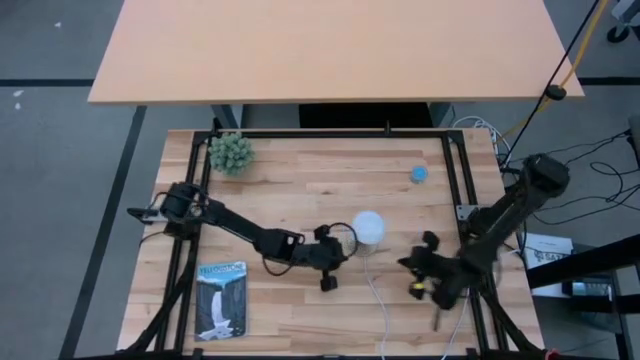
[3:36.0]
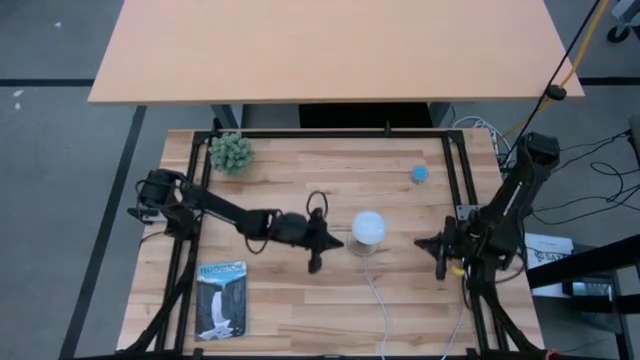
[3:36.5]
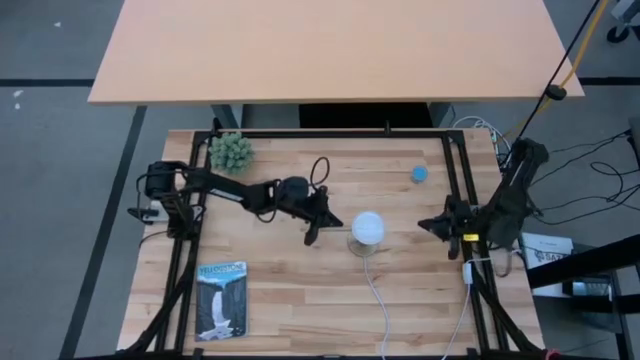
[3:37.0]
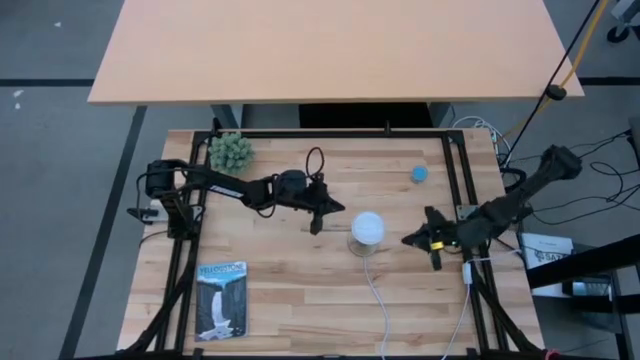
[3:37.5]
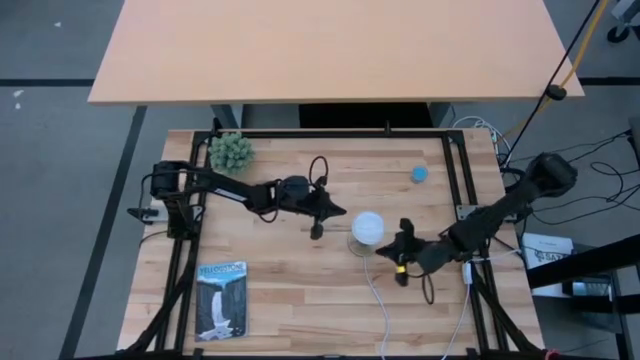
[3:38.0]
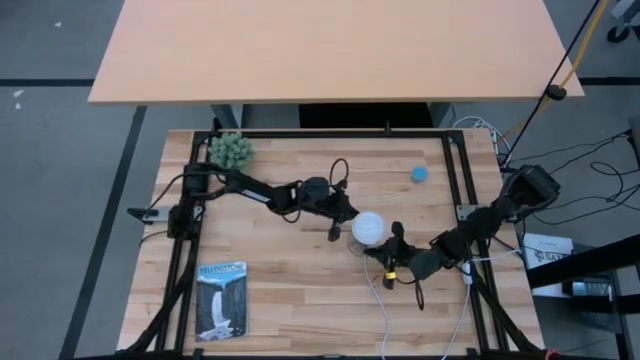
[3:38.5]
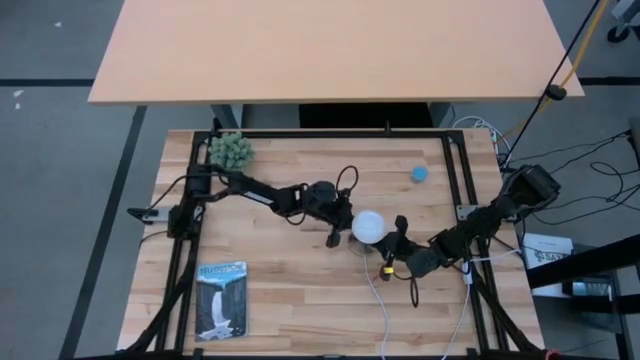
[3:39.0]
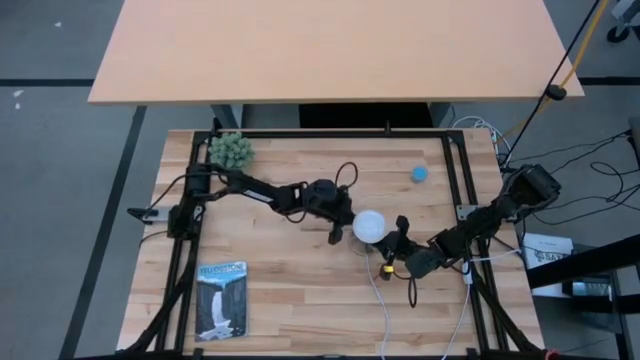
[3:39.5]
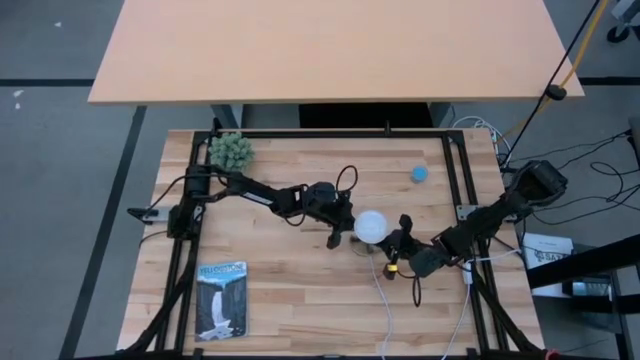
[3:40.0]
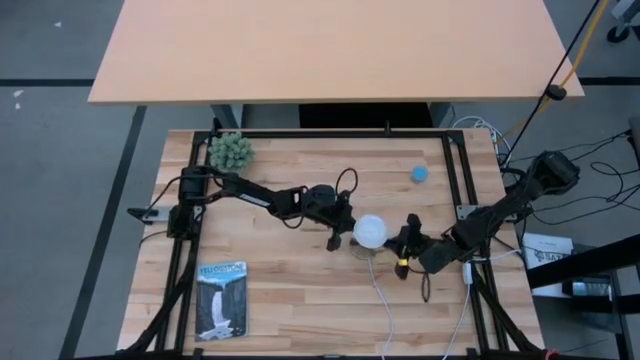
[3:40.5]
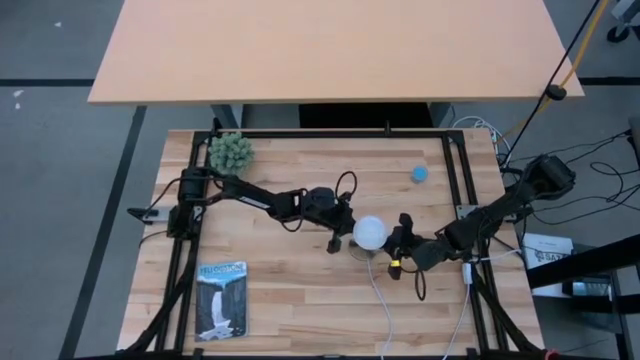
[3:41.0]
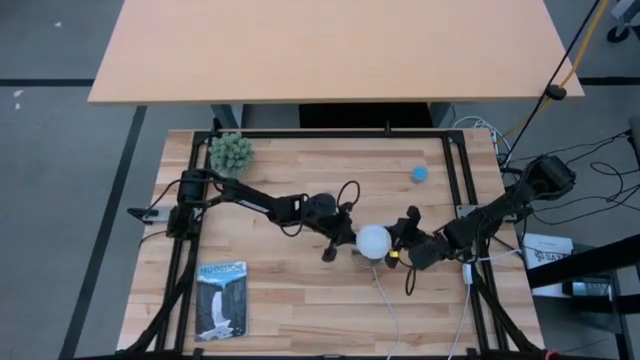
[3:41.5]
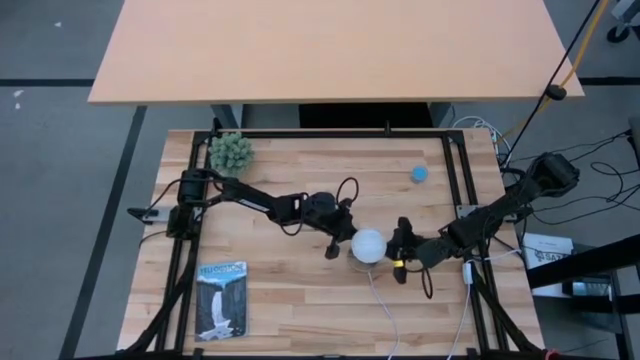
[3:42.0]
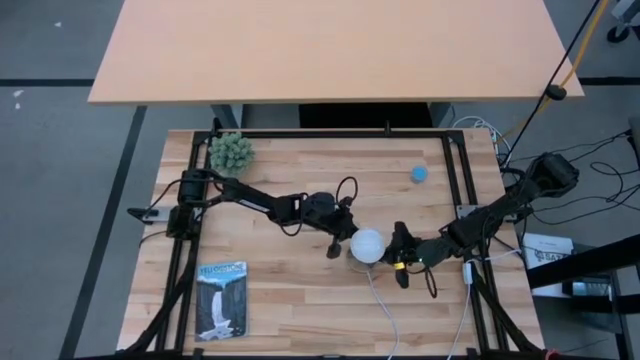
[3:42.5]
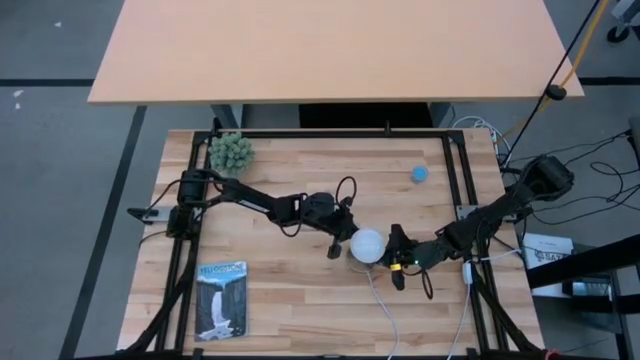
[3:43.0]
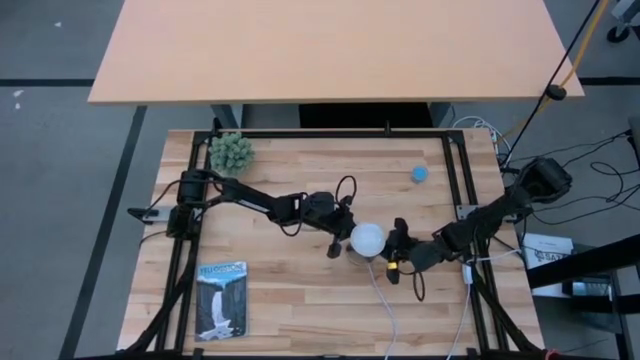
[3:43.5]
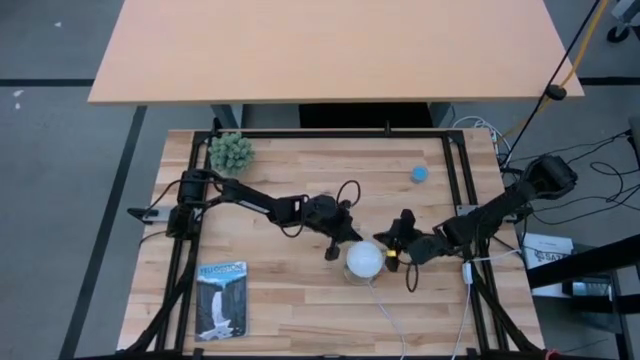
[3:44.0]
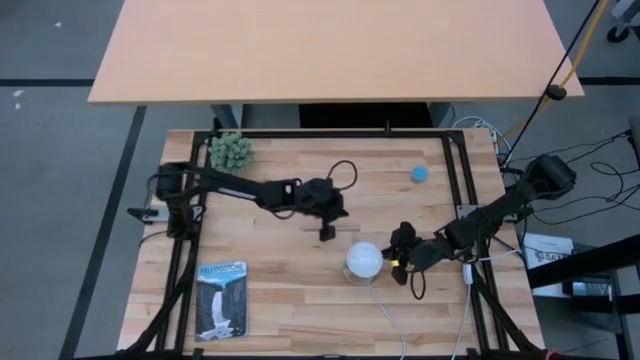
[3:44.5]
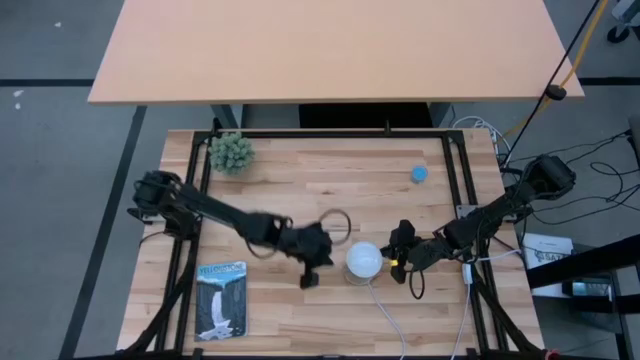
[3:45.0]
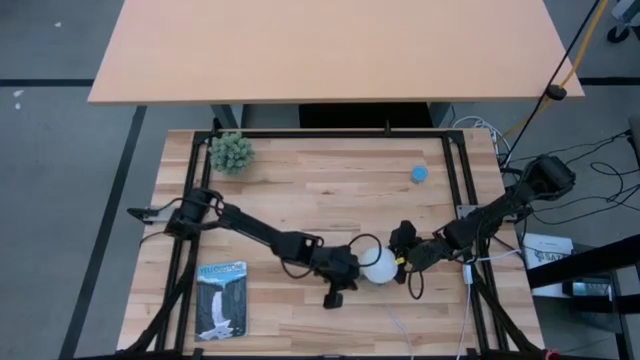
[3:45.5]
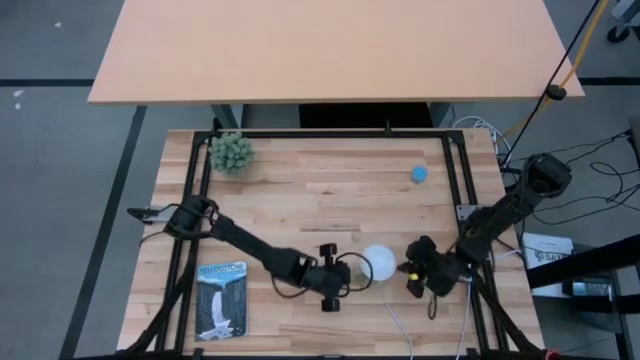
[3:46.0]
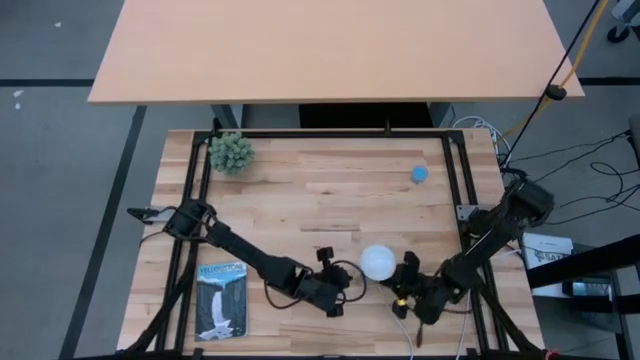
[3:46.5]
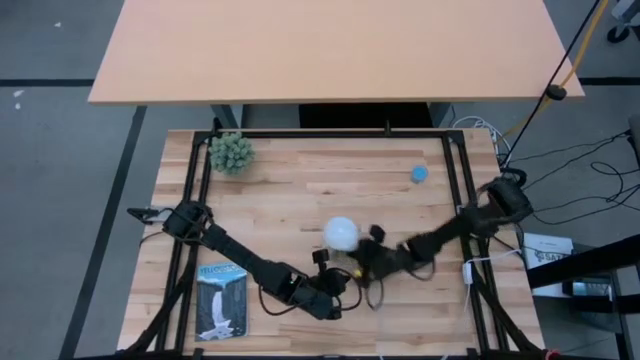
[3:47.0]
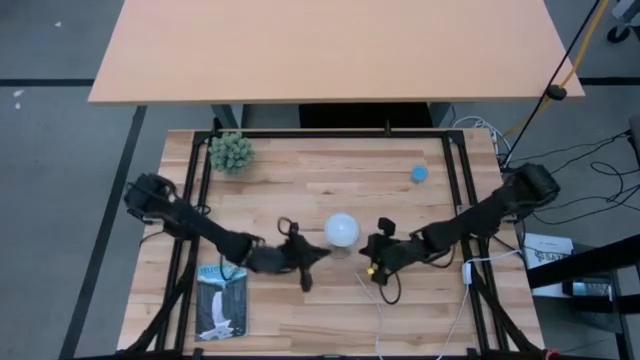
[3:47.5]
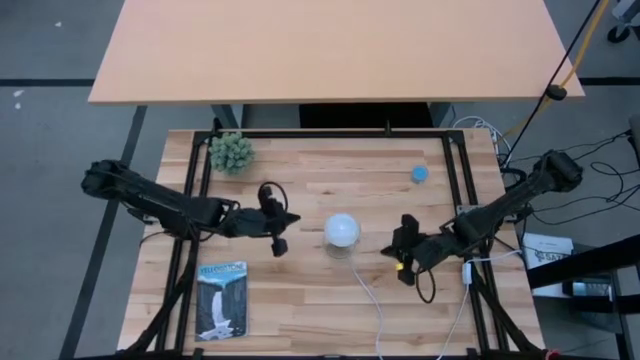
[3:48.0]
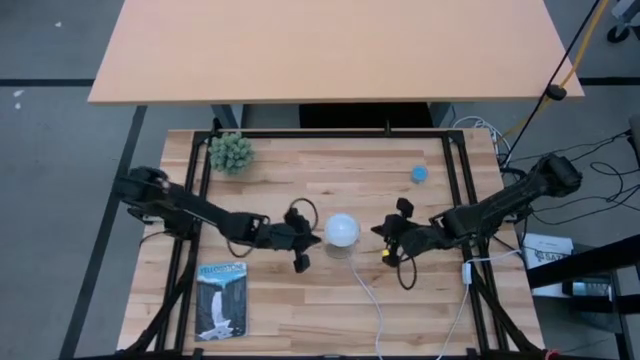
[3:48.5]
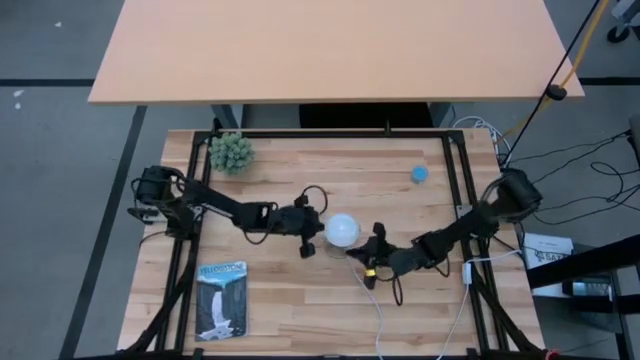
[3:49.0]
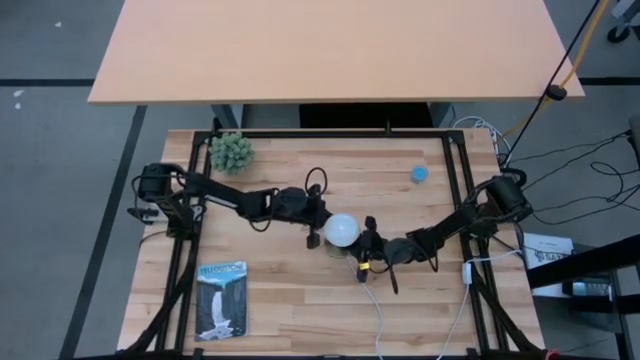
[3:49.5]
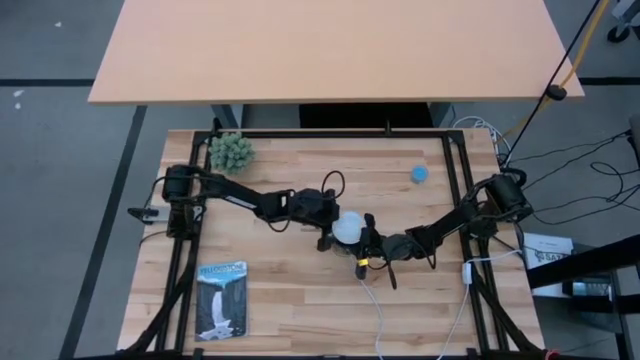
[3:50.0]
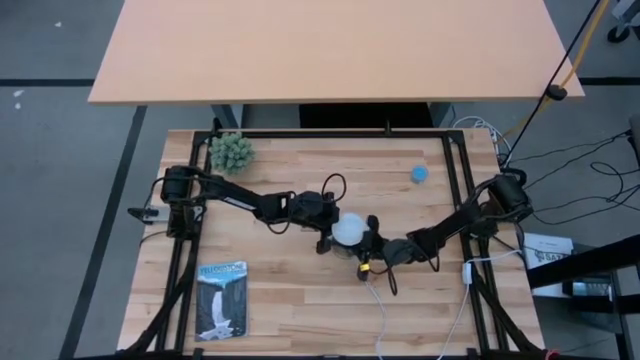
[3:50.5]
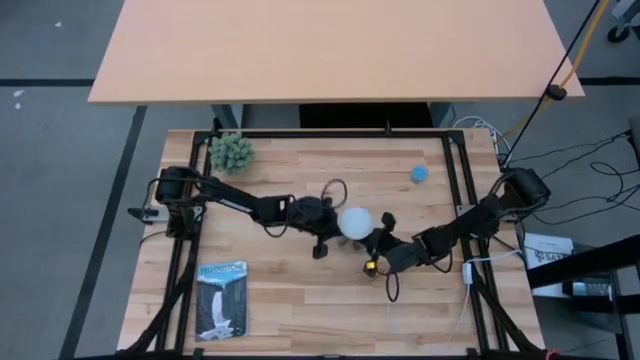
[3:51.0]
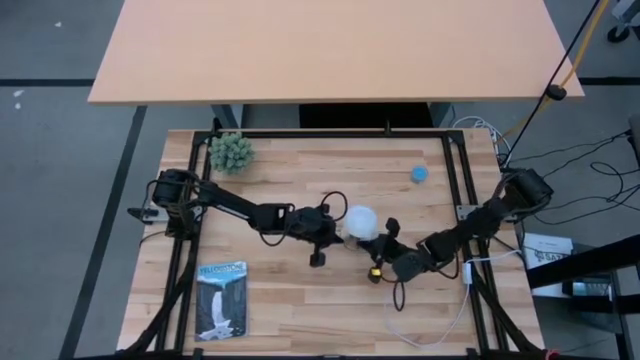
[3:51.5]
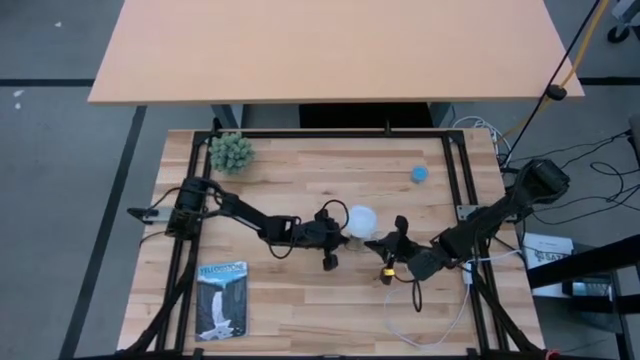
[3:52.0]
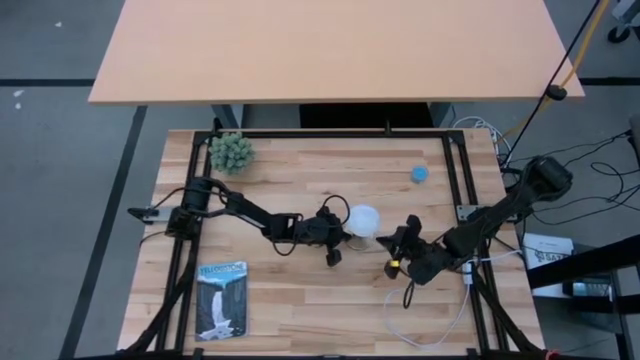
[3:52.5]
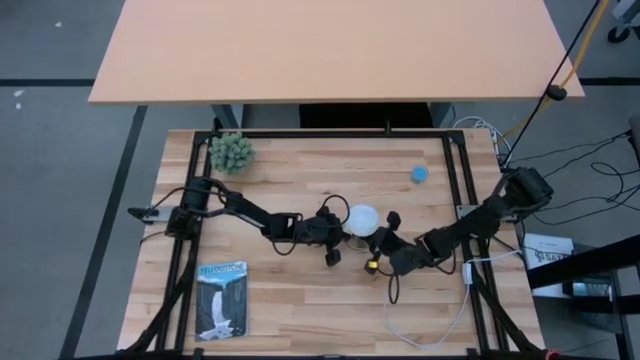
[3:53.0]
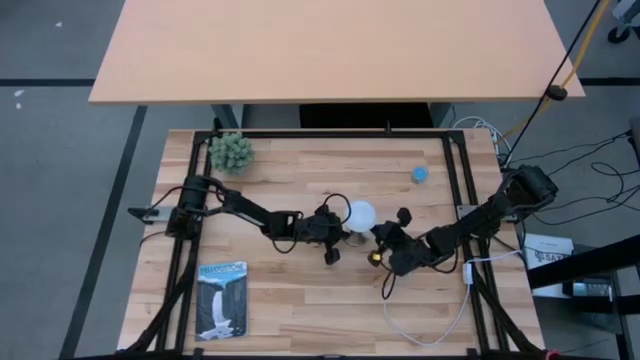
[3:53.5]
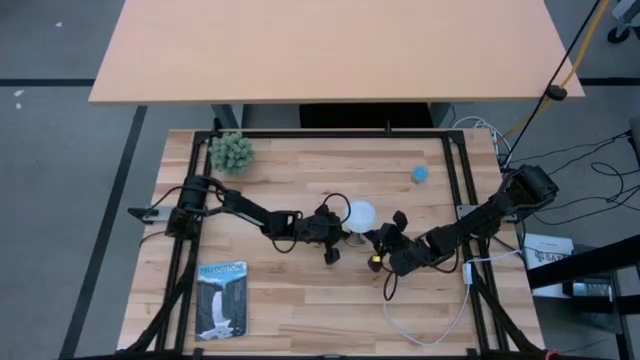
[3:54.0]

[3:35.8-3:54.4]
Task: Screw lightbulb
Remove the lightbulb from the desk lamp

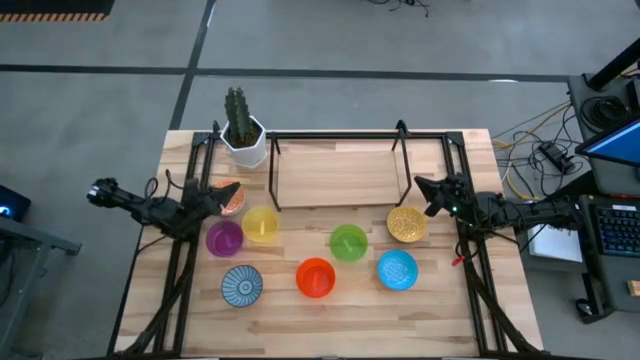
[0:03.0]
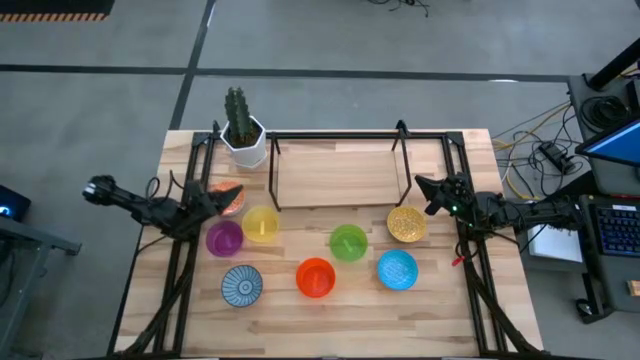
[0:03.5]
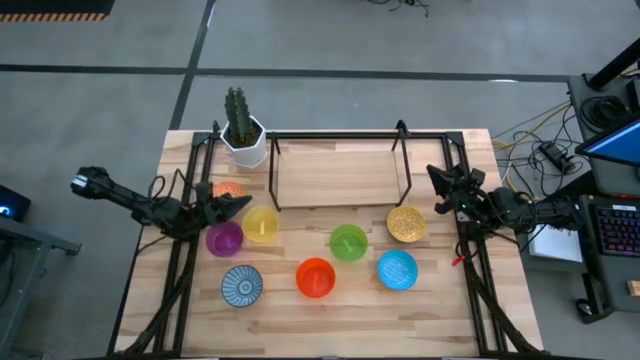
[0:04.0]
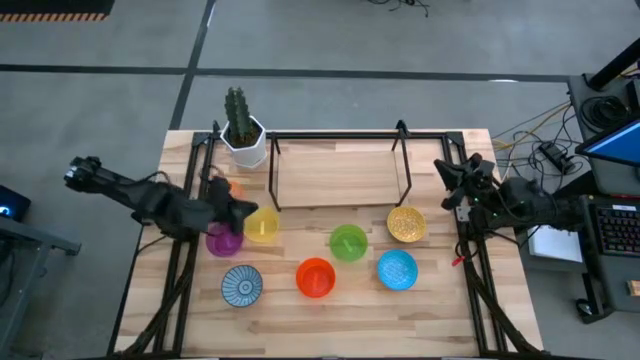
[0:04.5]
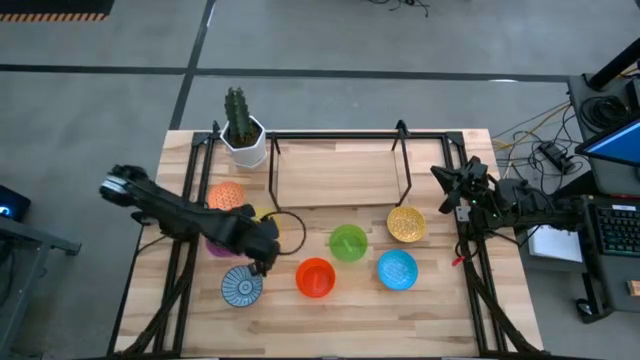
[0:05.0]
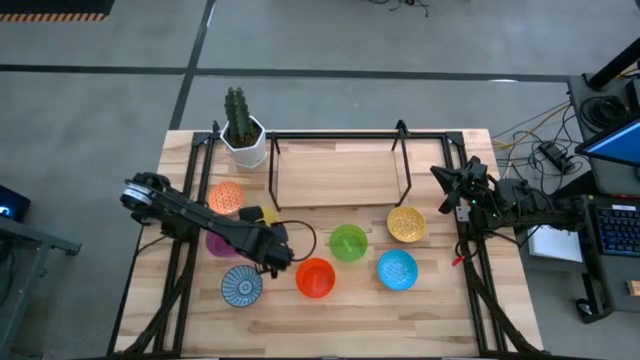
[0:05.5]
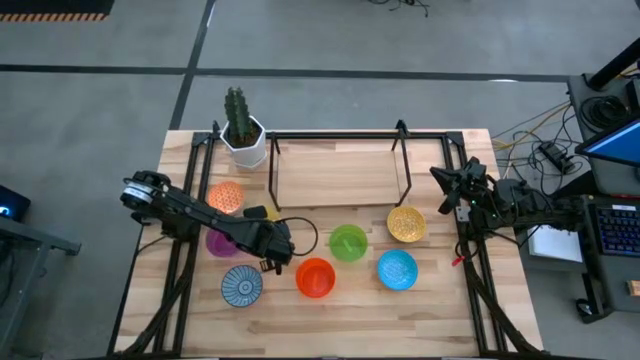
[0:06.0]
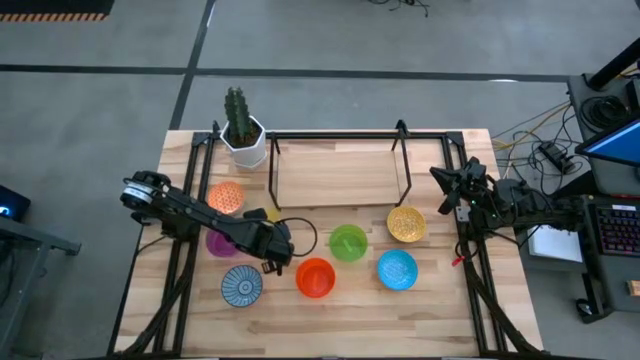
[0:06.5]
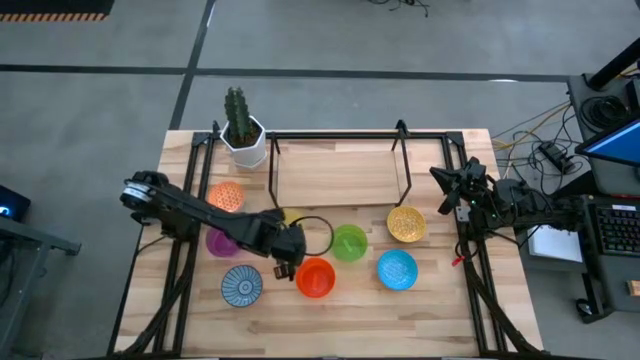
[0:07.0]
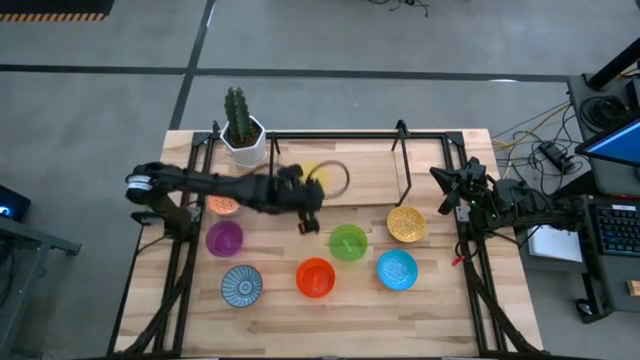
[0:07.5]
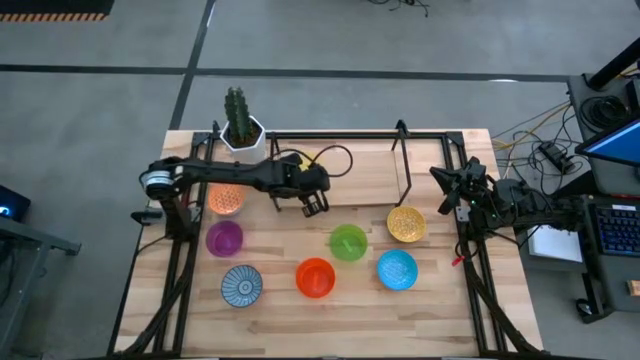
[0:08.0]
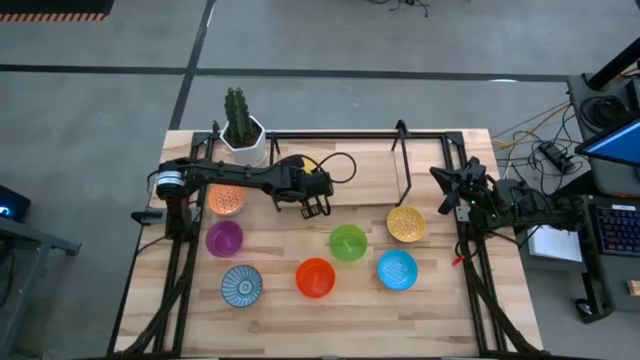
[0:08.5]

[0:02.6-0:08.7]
Task: Place and stack bowls onto a shelf
Put the left yellow bowl onto the shelf
